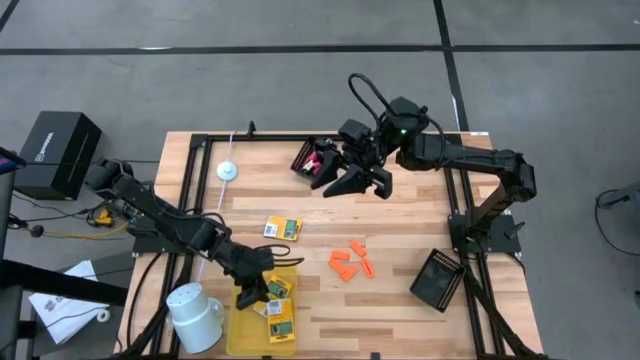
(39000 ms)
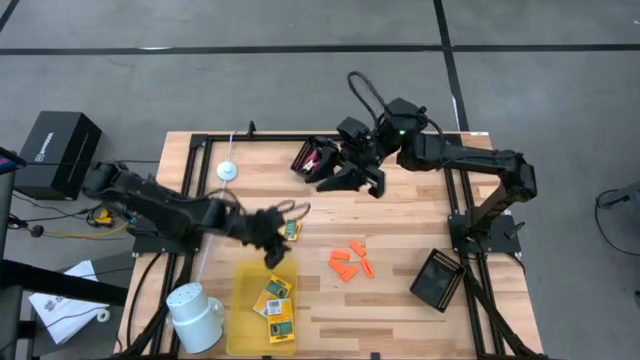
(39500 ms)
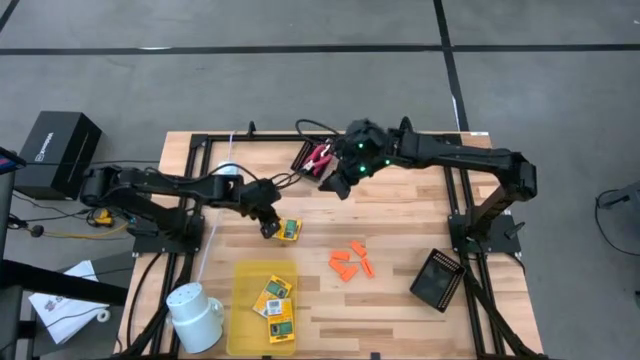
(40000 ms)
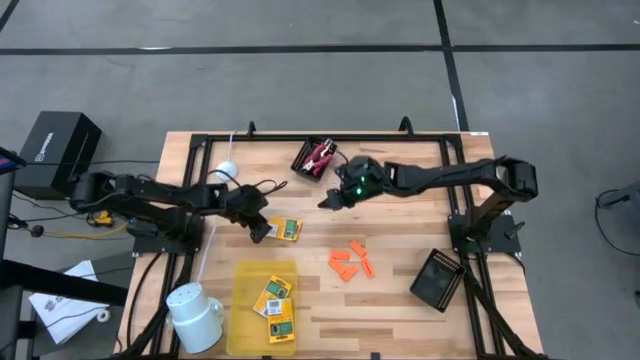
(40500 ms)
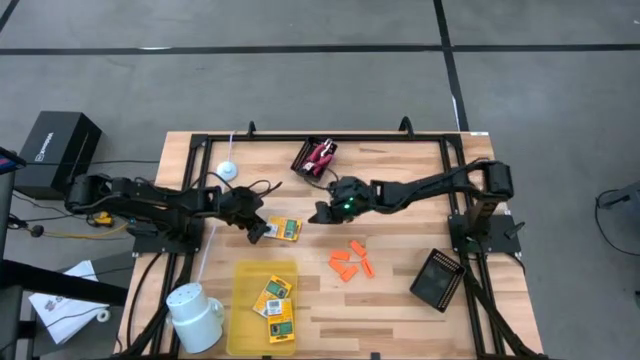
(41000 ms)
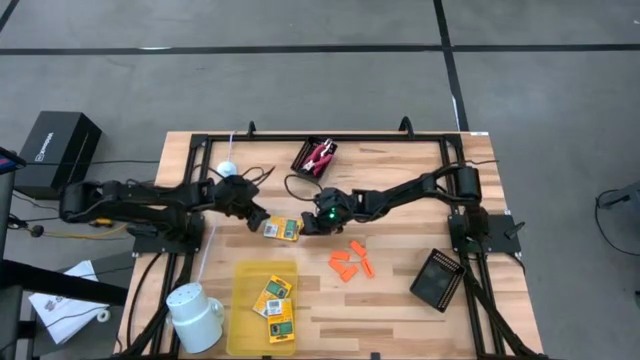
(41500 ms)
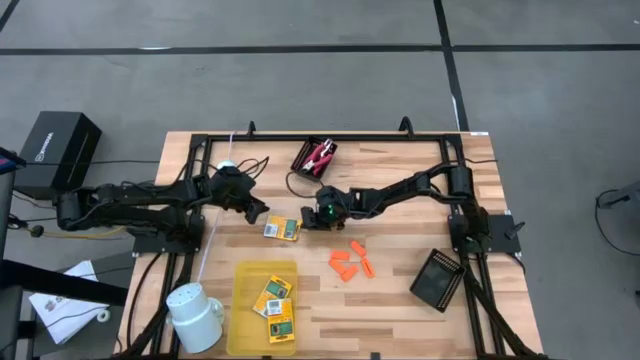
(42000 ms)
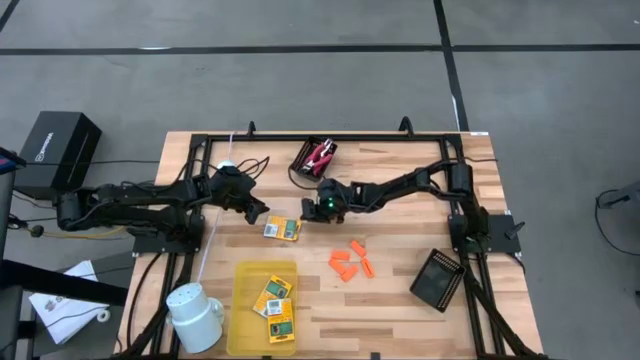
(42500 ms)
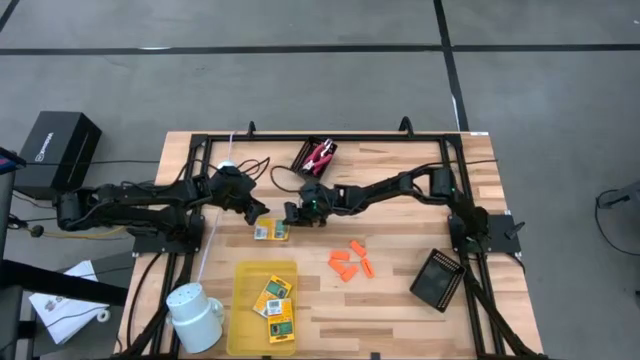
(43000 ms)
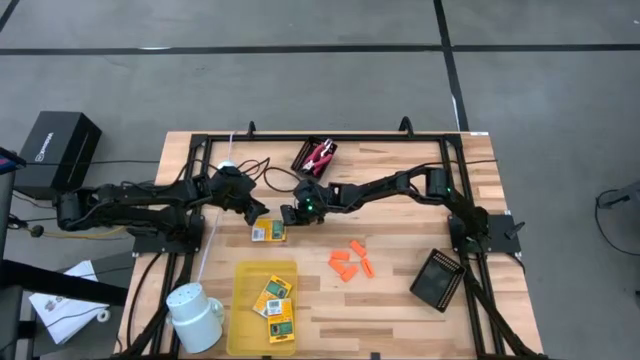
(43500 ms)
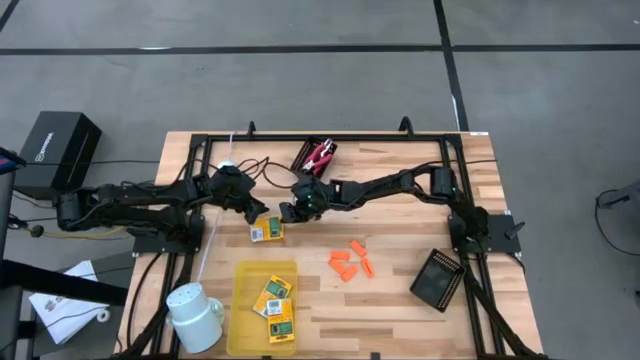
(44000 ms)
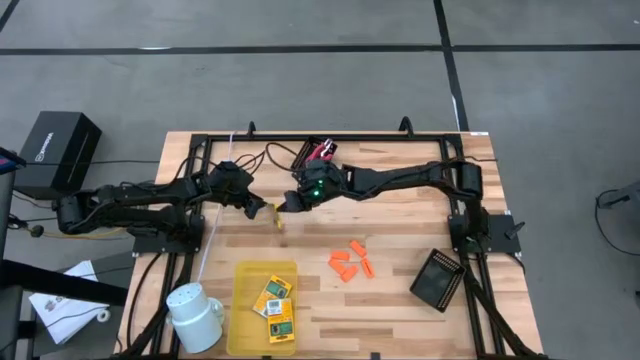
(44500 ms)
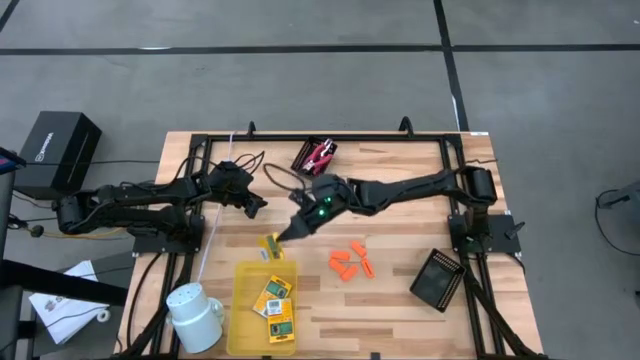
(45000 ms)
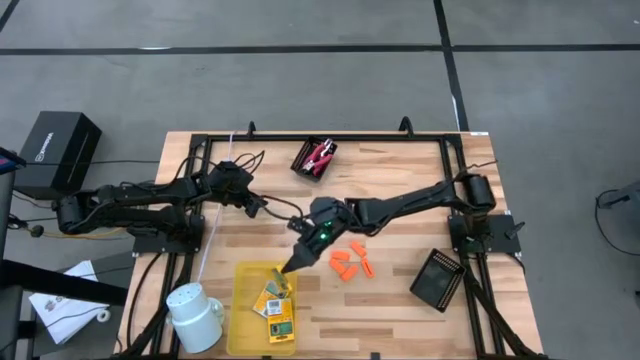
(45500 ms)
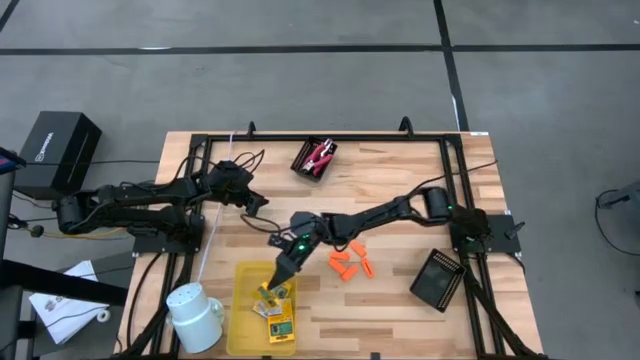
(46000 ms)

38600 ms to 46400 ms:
Task: Pick & Place School Supplies
Put the yellow crayon box into the yellow bin

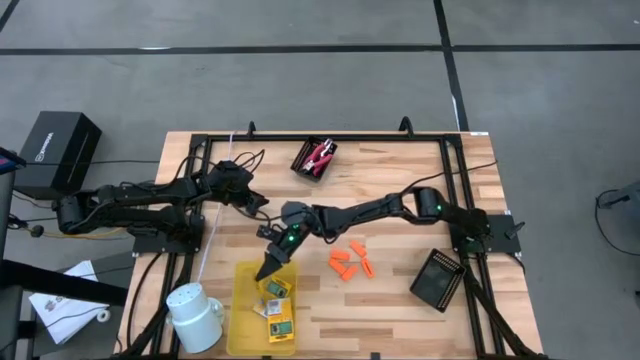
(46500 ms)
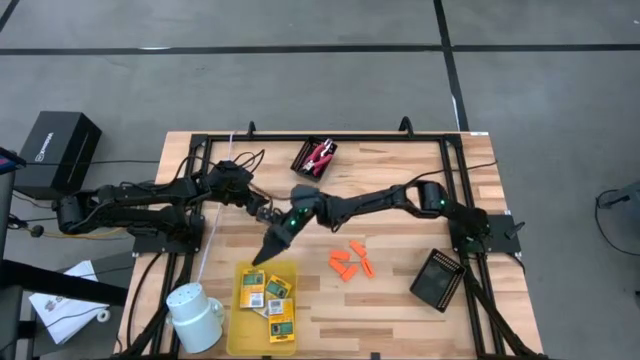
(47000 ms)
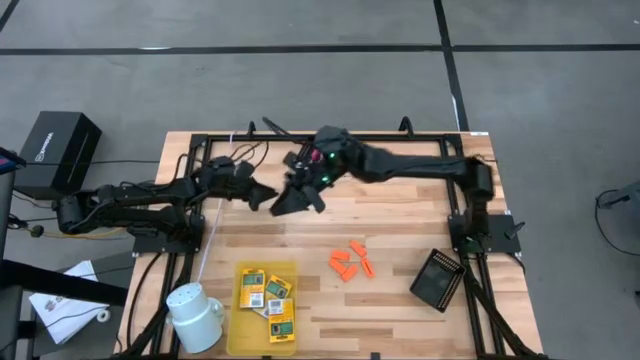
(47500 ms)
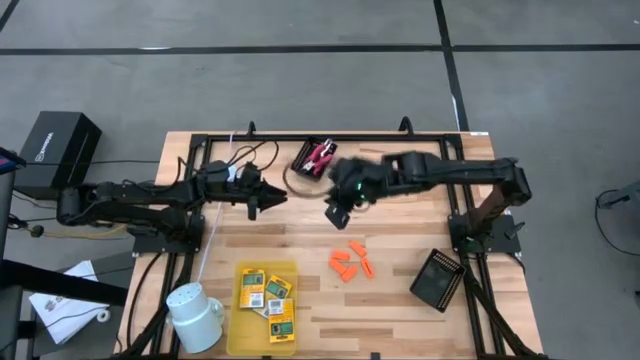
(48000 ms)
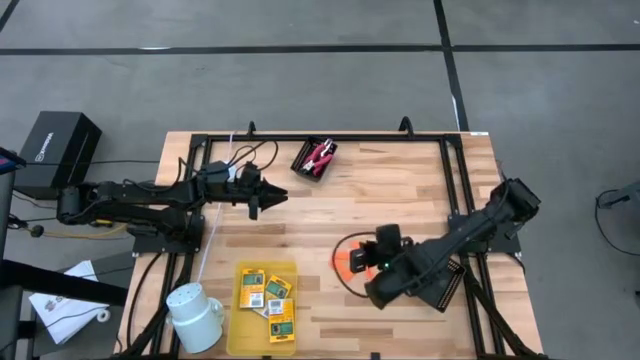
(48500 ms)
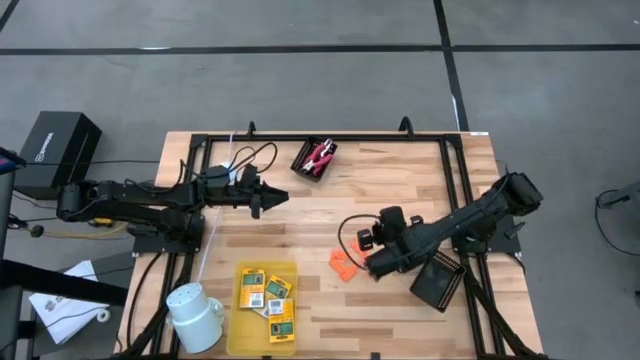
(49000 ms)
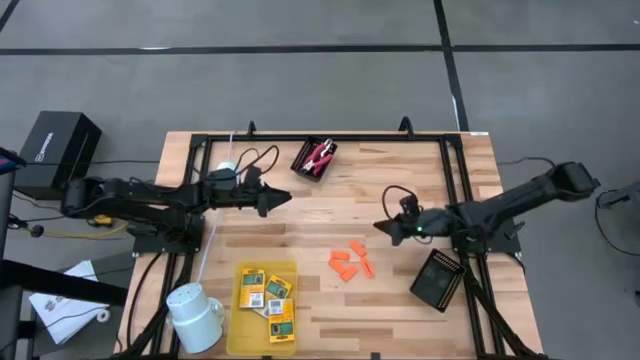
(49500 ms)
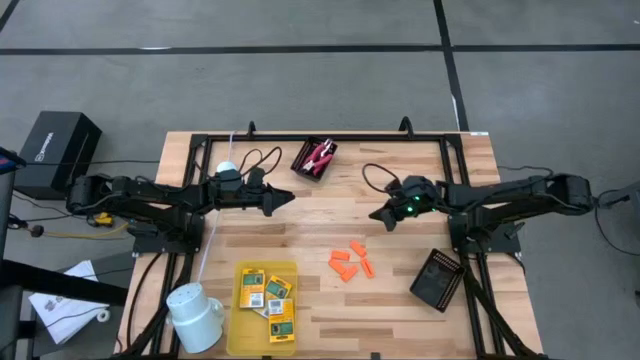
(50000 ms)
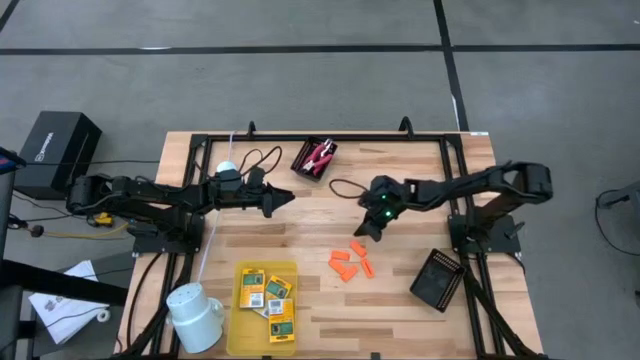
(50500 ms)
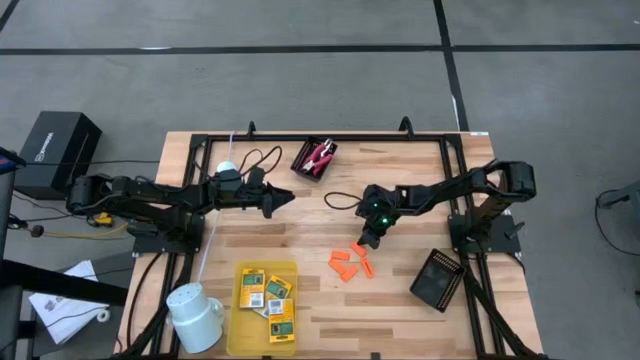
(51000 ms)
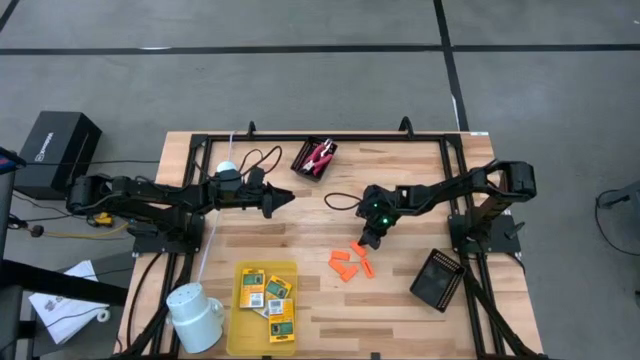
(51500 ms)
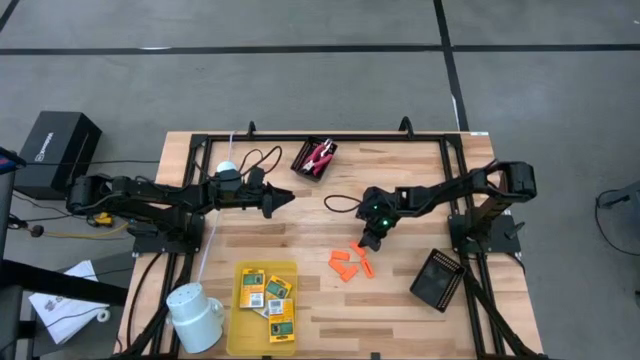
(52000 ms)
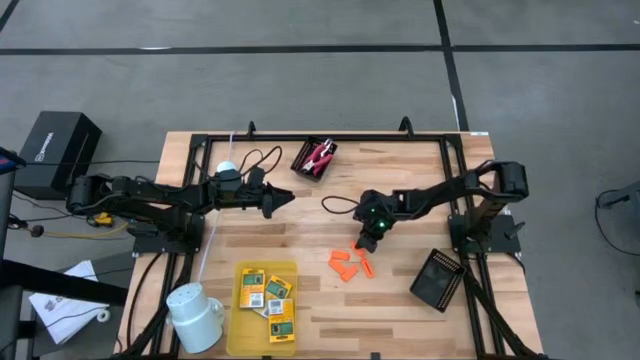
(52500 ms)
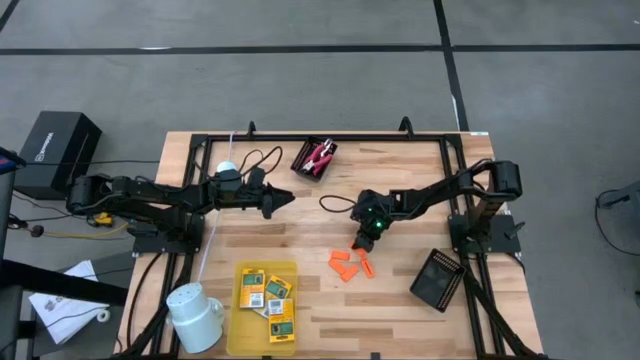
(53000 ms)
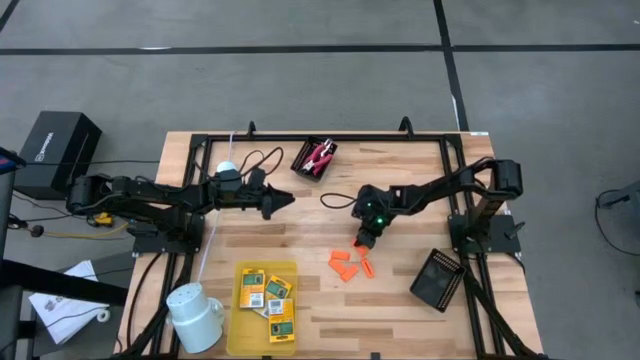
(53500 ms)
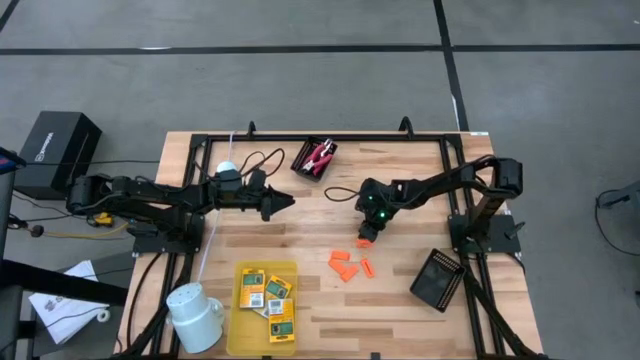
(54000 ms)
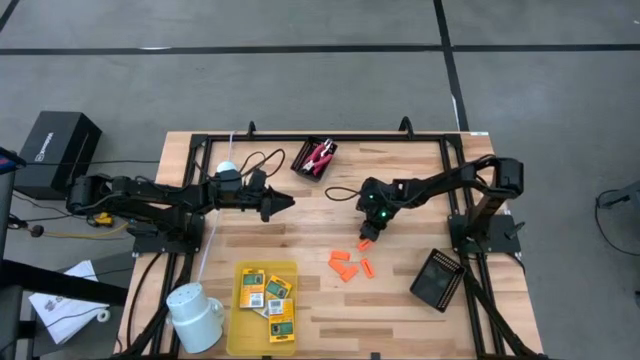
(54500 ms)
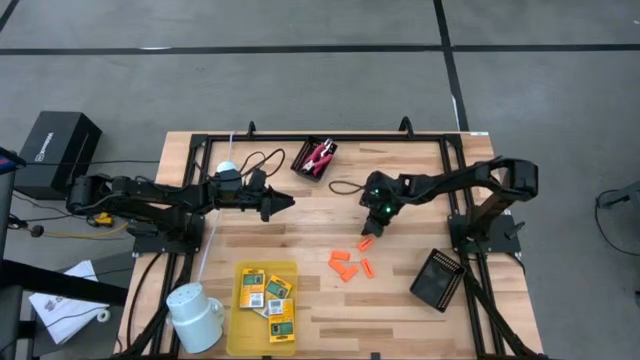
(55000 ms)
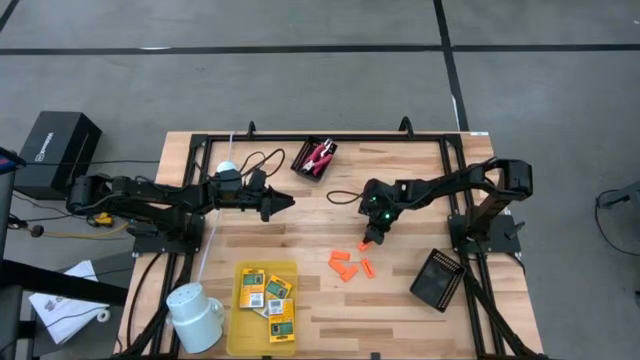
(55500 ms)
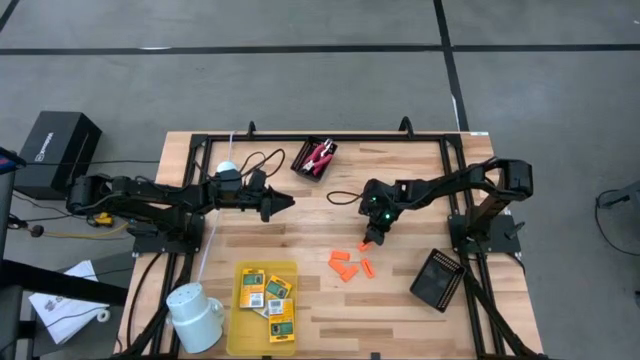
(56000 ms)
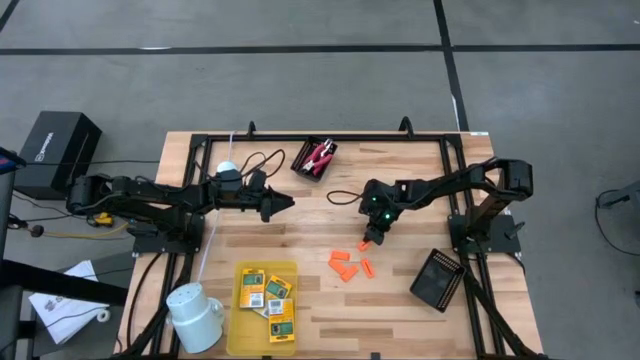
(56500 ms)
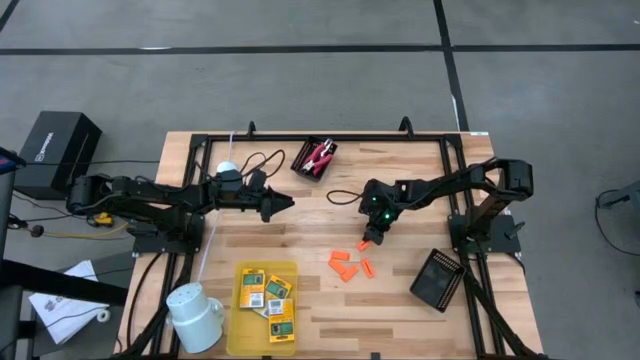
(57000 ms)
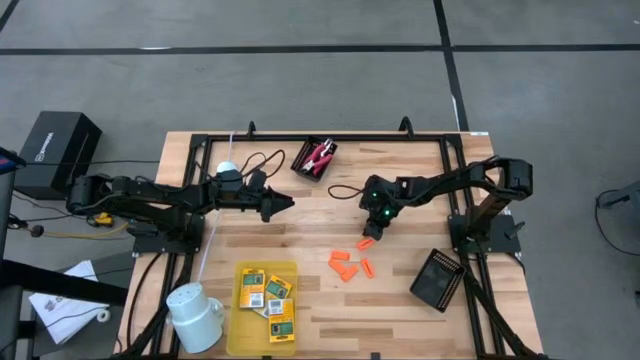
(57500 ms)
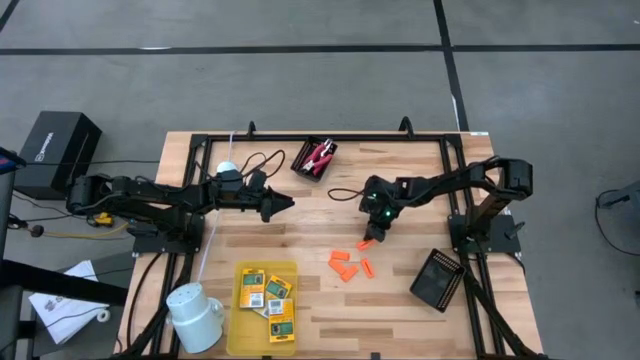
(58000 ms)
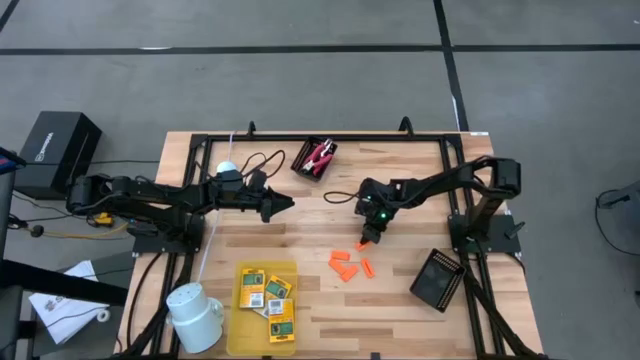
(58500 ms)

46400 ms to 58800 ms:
Put the orange eraser into the bottom black bin

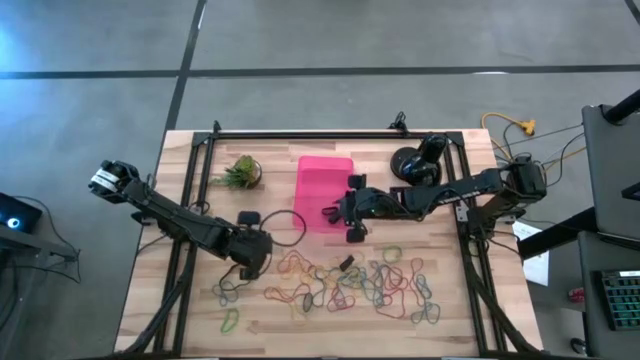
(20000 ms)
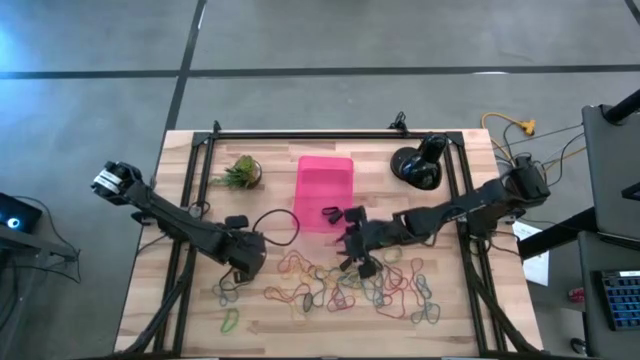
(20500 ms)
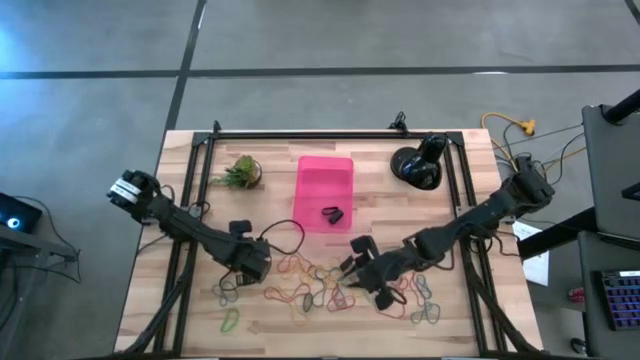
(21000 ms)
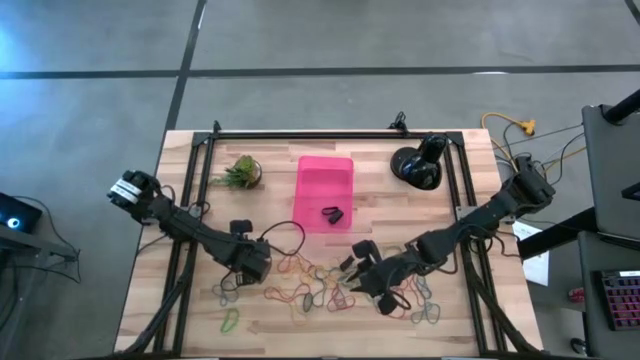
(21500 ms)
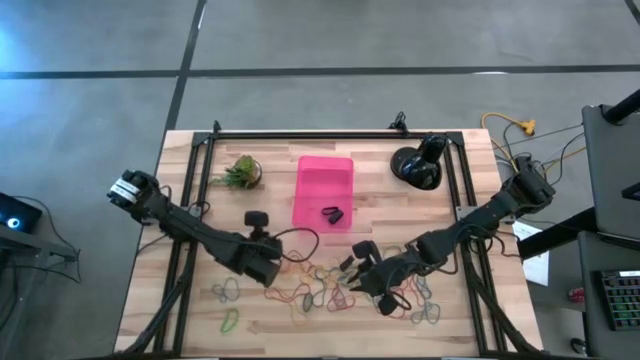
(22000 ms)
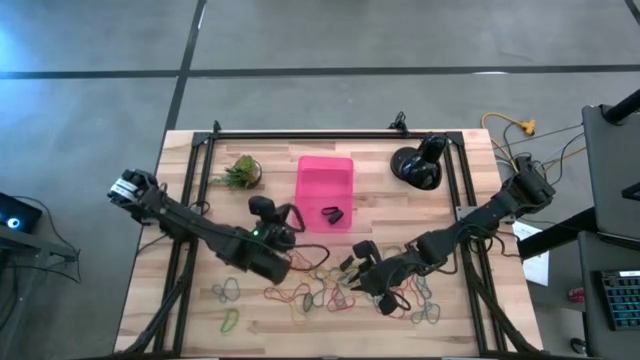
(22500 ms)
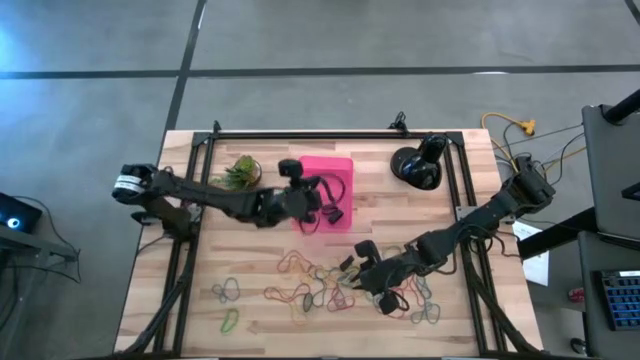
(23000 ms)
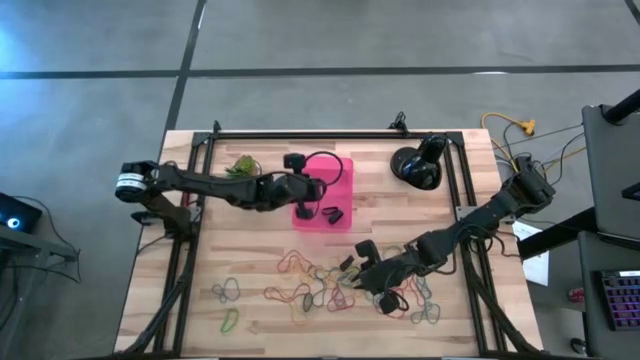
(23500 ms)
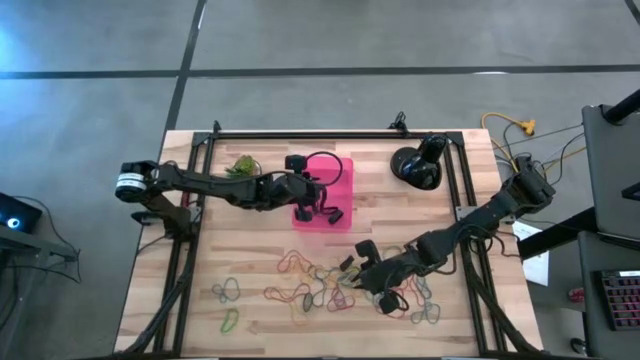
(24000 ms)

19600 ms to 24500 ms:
Task: Pick and place rubber bands into bin
Put the black rubber bands into the pink bin
